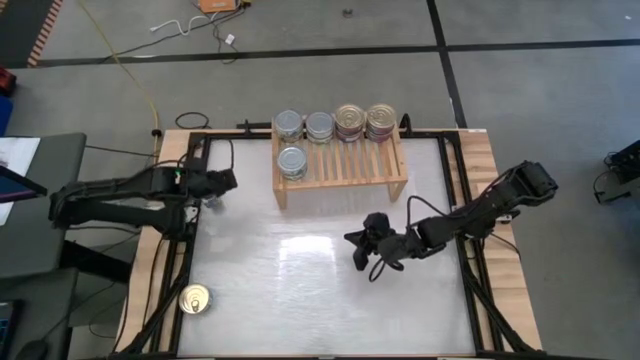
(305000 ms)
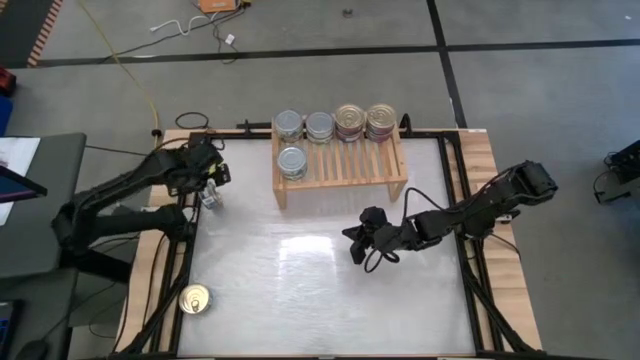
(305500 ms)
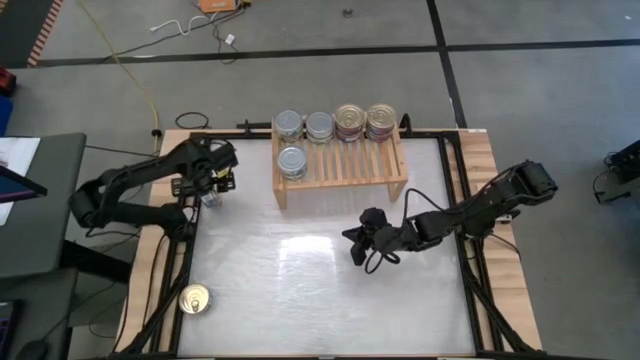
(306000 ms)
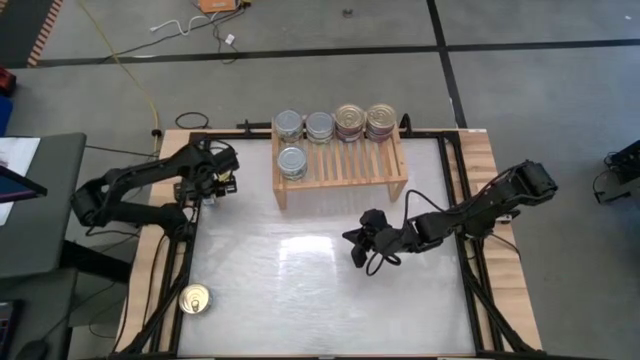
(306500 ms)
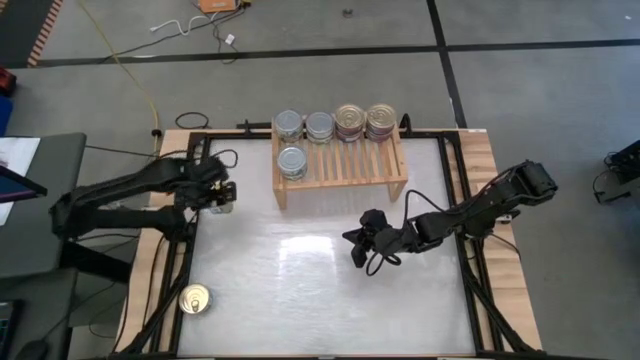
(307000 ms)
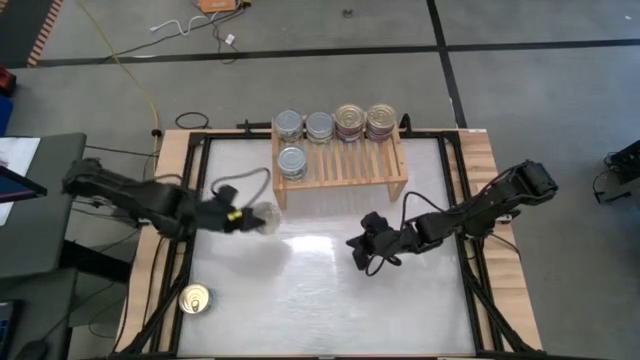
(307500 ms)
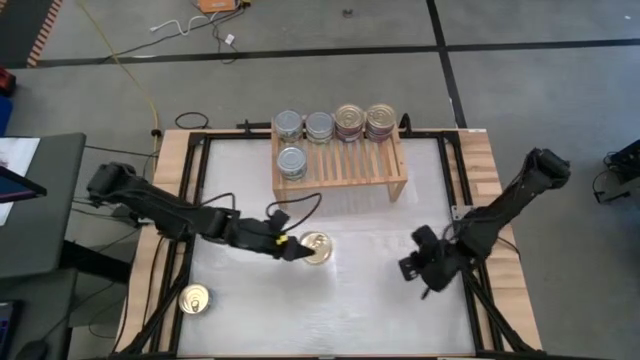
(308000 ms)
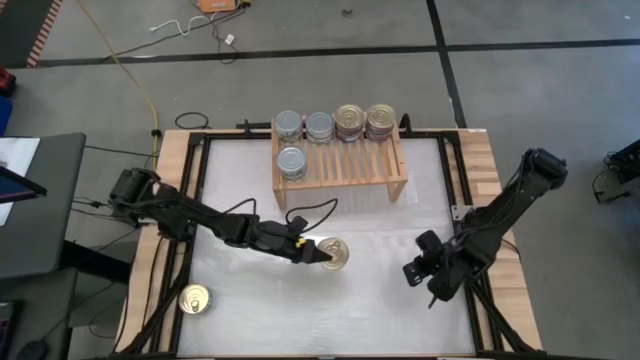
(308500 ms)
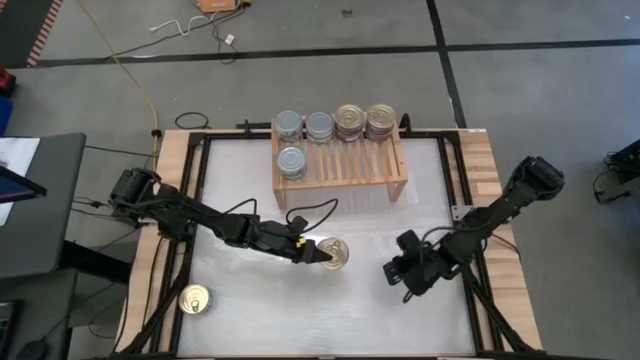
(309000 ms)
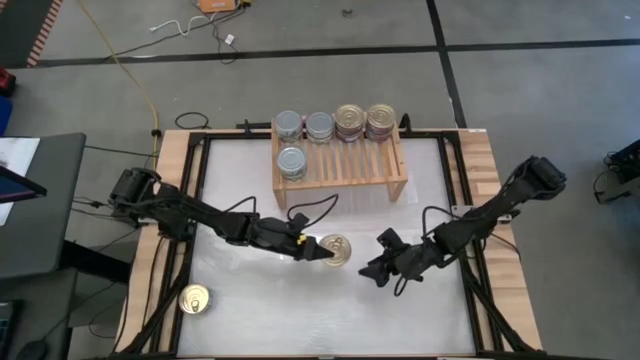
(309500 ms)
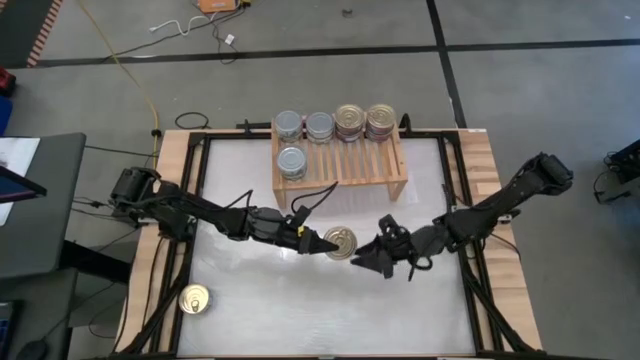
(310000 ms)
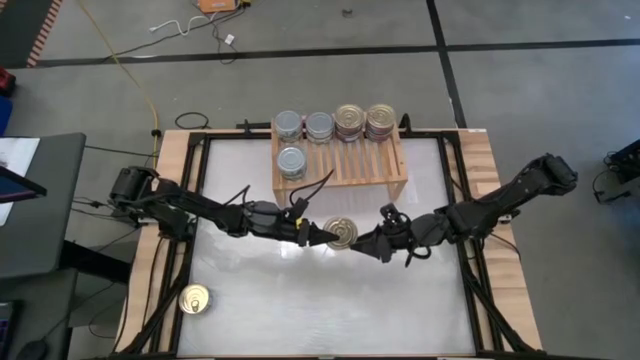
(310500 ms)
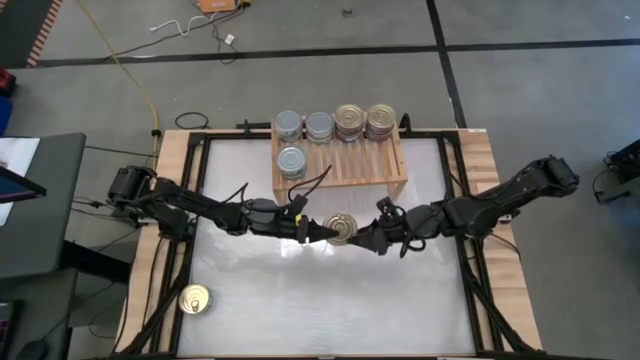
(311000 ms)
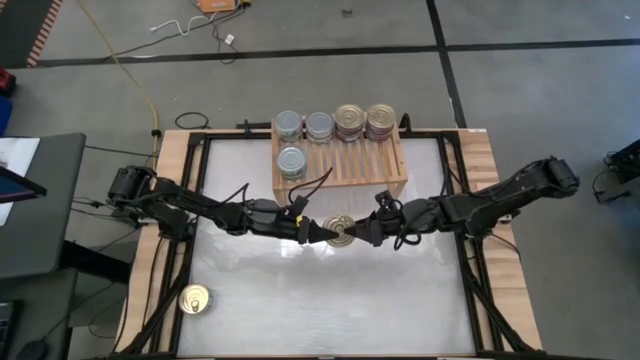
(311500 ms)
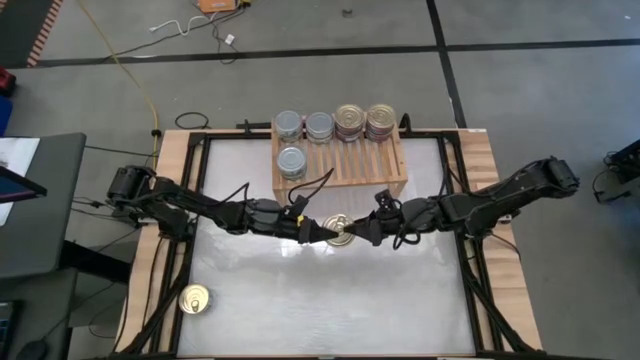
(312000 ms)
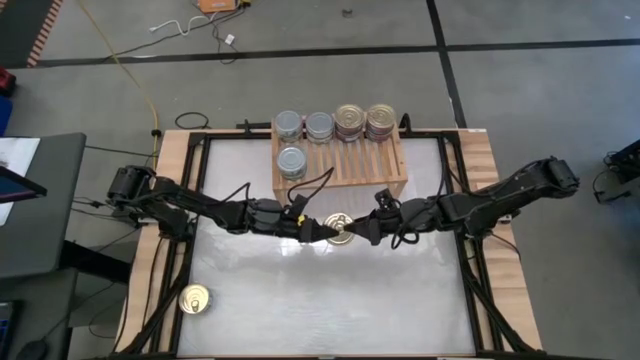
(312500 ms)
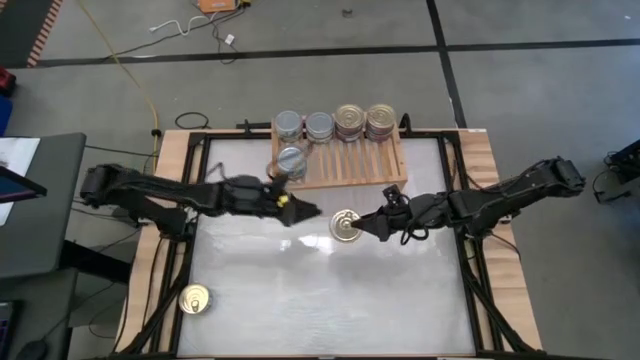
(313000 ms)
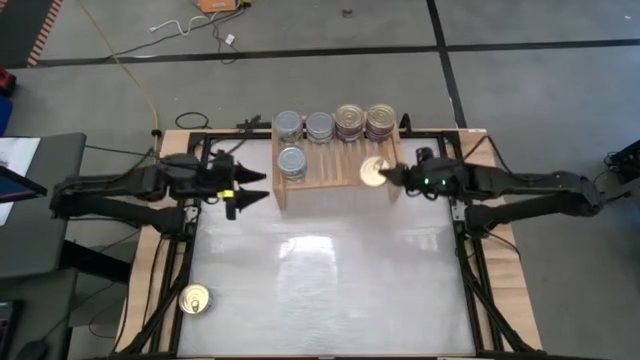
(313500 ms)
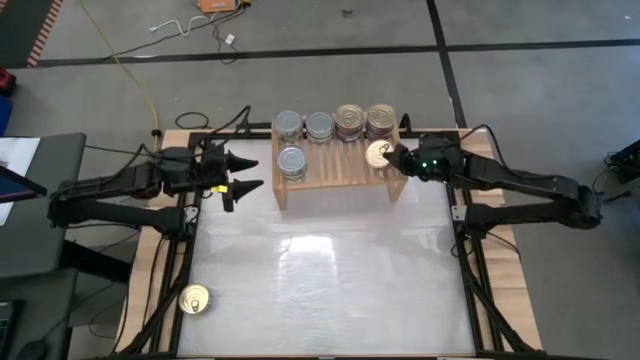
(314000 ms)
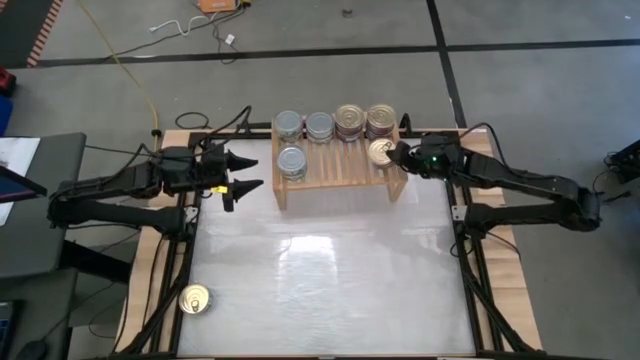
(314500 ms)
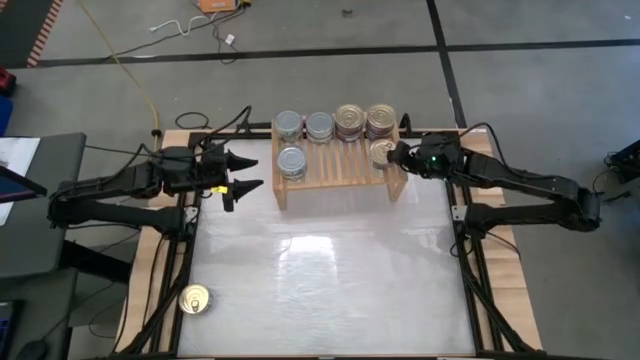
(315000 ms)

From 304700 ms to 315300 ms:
Task: Stack canned seafood by type on shelf
Put the blue tuna can on the shelf

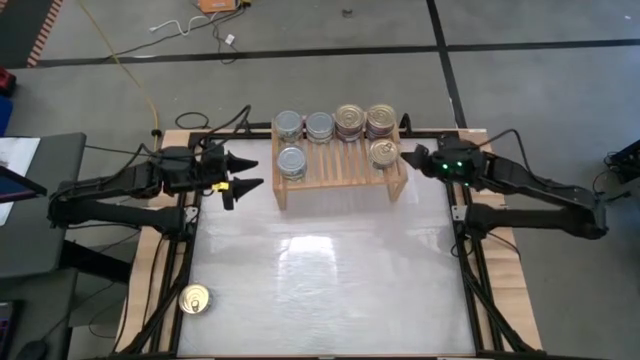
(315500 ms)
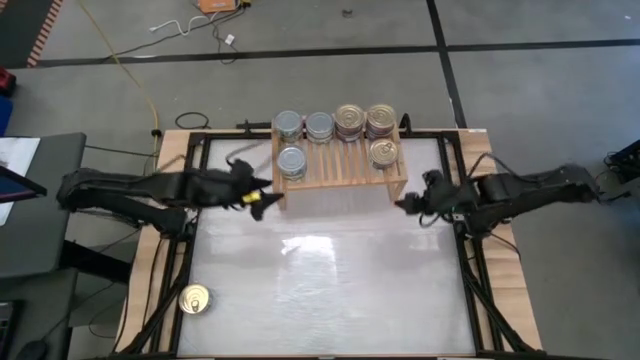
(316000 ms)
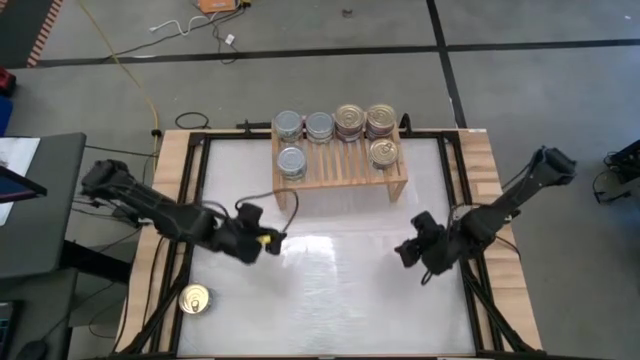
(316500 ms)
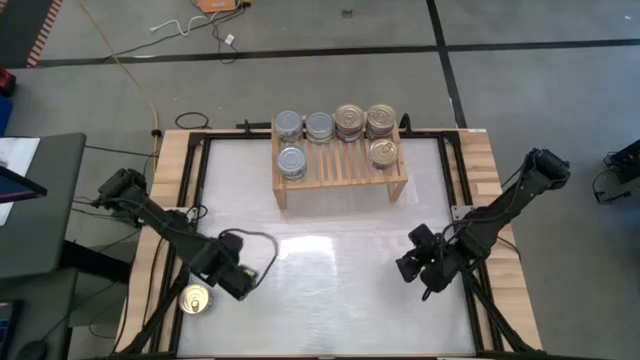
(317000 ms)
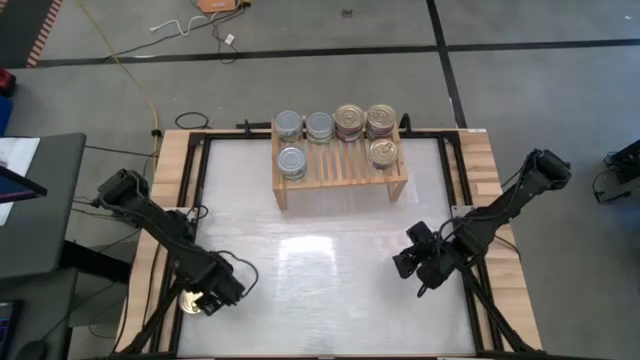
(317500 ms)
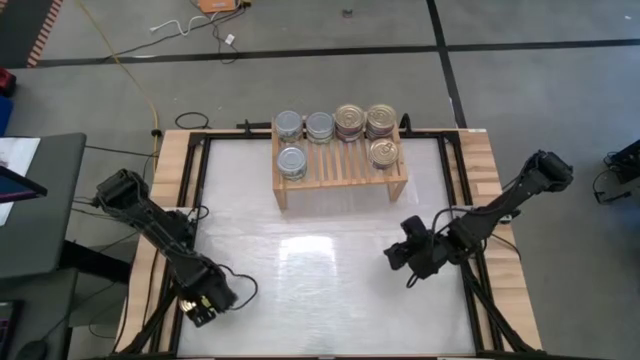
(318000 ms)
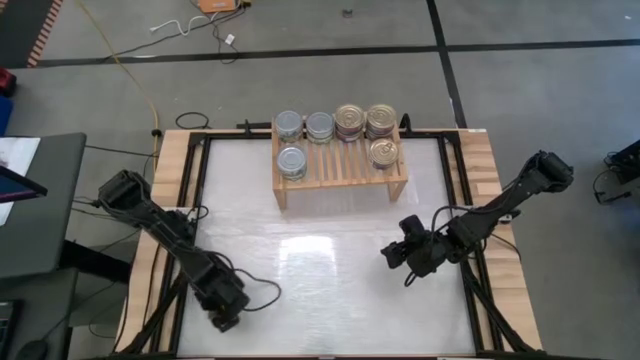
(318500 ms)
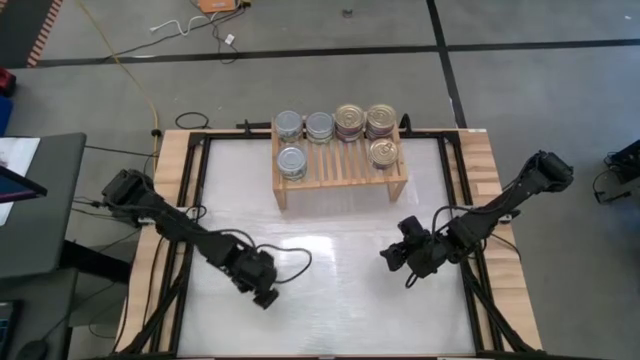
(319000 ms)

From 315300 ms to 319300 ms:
Stack the blue tuna can on top of the blue tuna can on the shelf

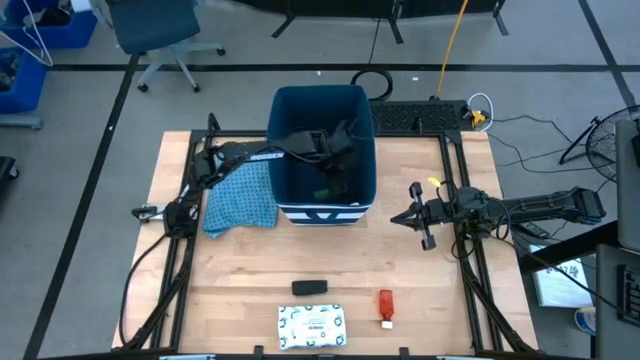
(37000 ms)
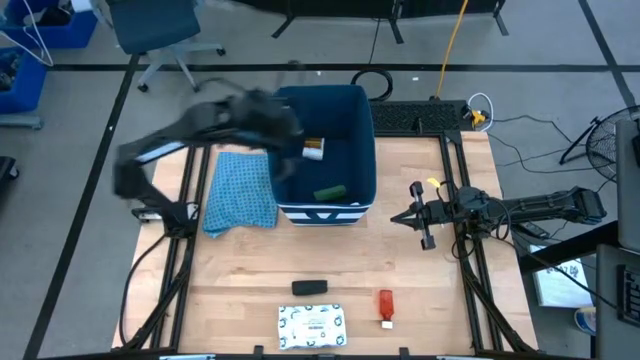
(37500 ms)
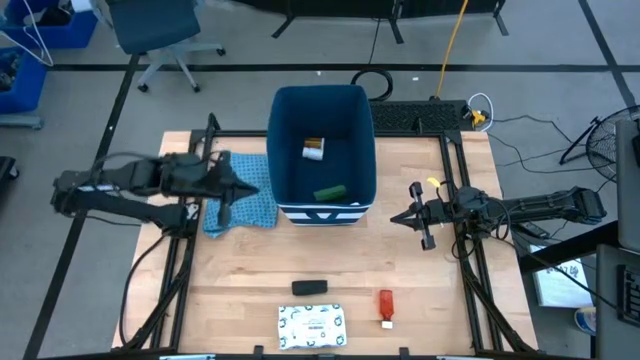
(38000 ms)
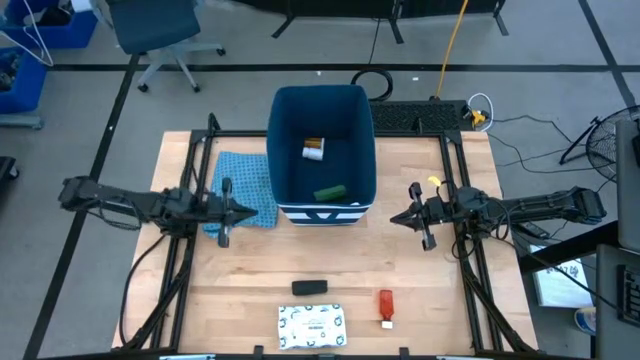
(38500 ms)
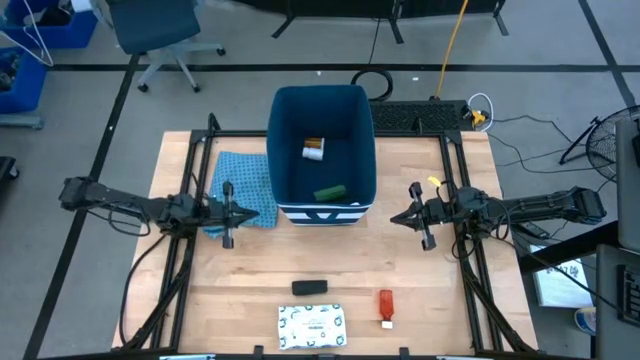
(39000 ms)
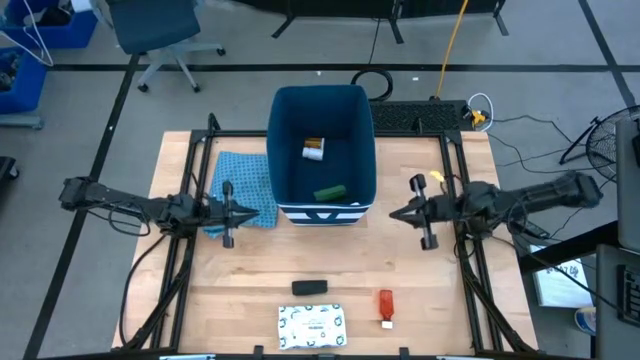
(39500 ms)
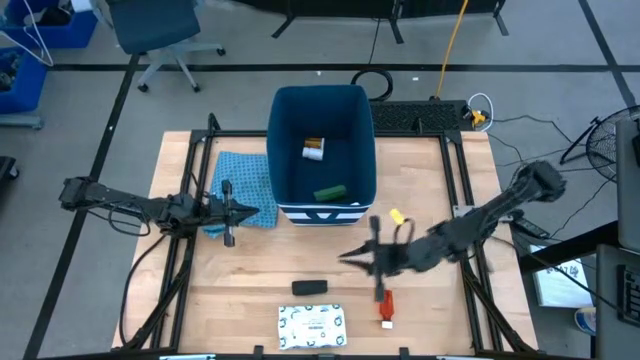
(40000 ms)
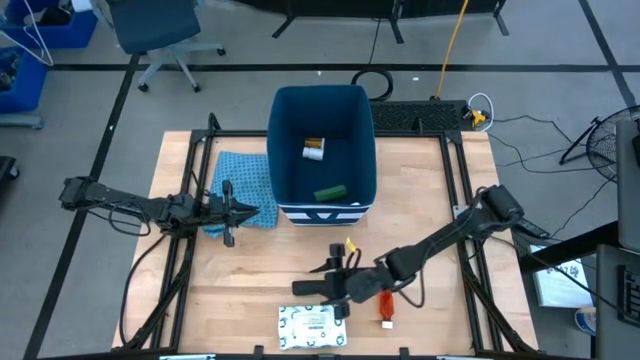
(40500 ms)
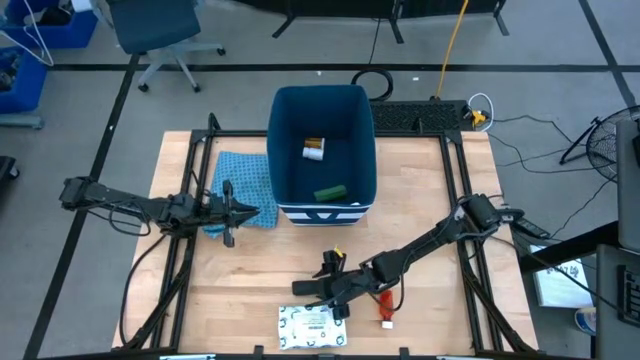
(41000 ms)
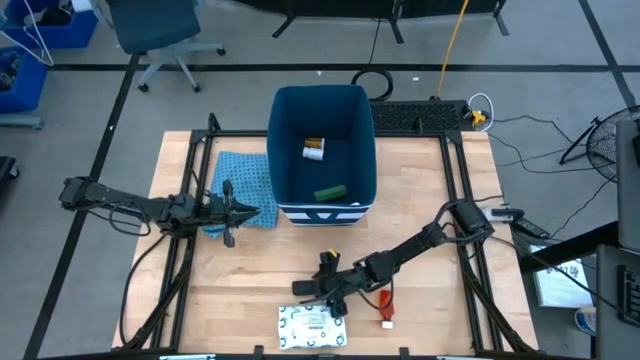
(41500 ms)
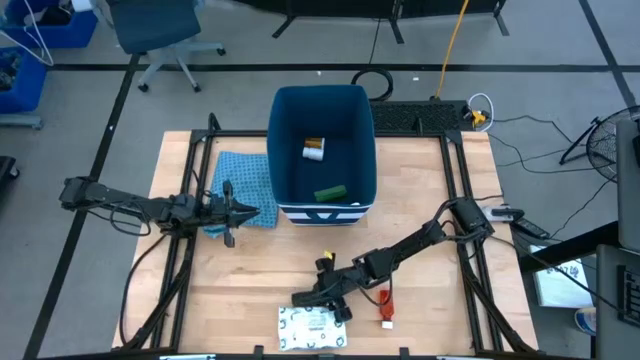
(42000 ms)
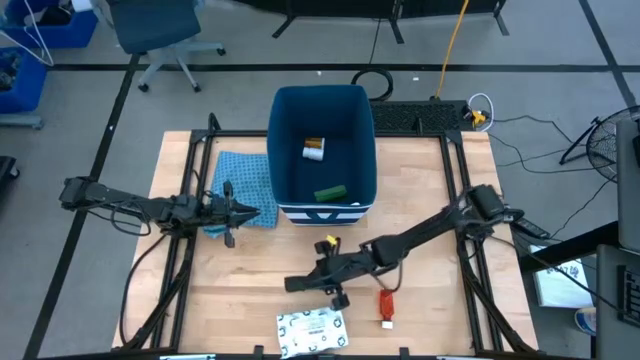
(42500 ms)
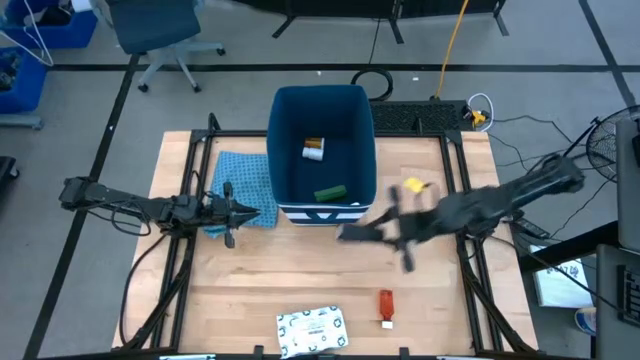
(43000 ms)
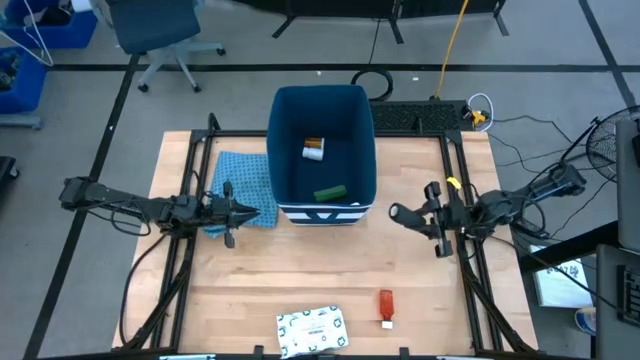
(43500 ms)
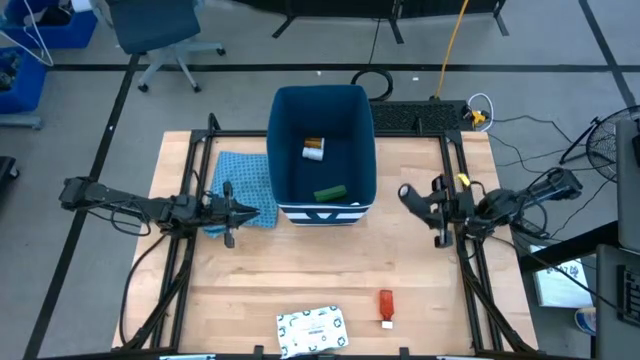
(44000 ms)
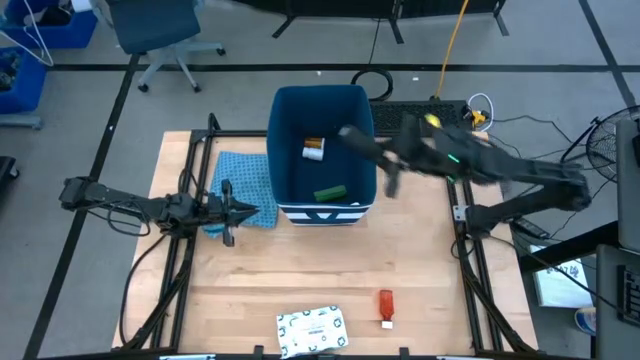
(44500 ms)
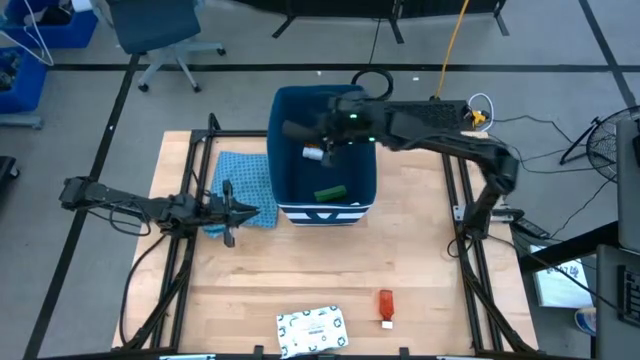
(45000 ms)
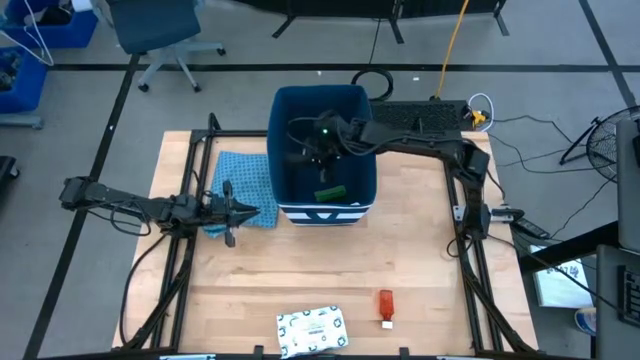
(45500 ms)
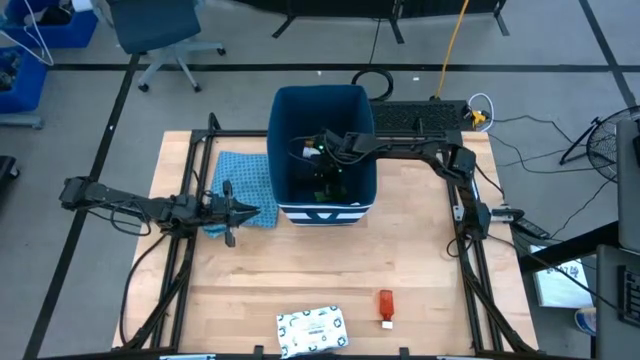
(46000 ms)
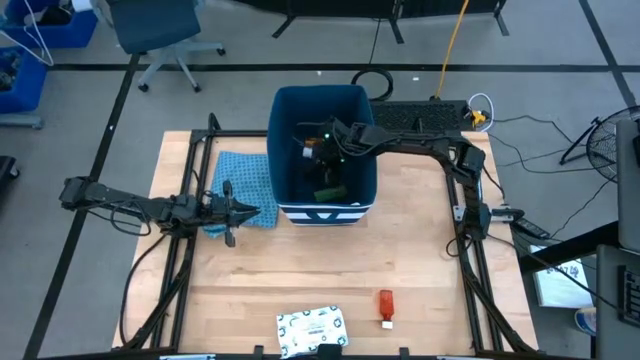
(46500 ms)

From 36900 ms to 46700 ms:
Task: Pick & place medical supplies in basket/bin
Put the black bandage into the blue bin
